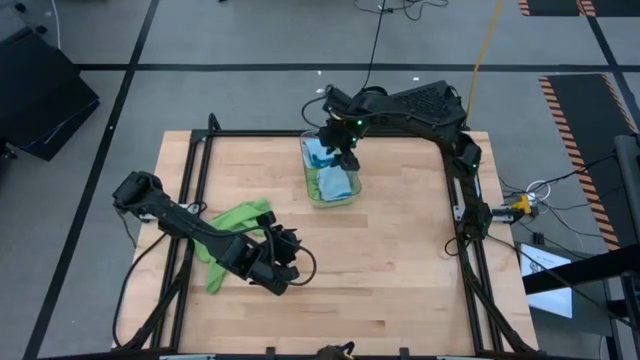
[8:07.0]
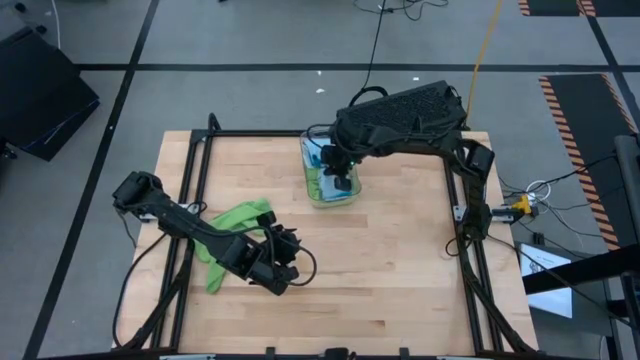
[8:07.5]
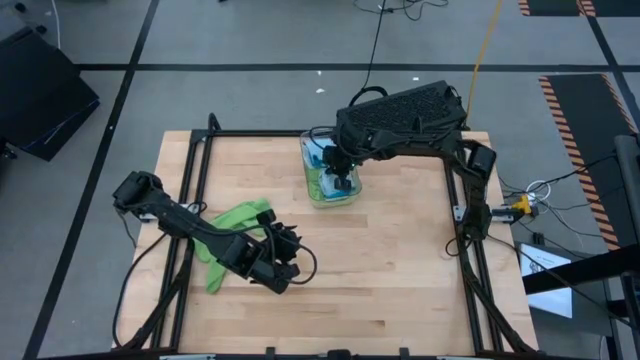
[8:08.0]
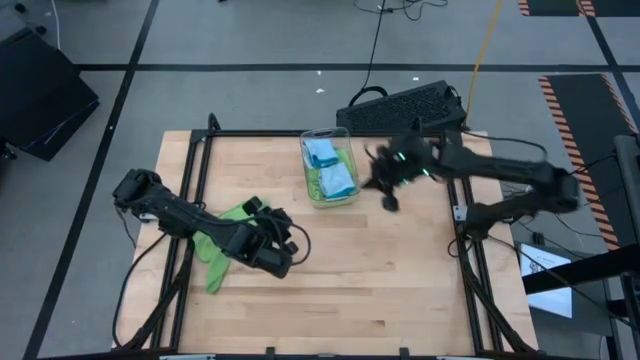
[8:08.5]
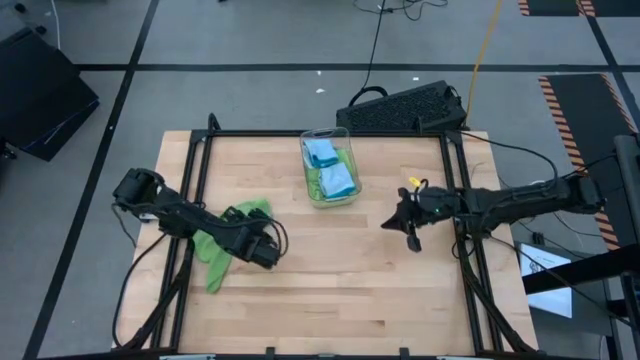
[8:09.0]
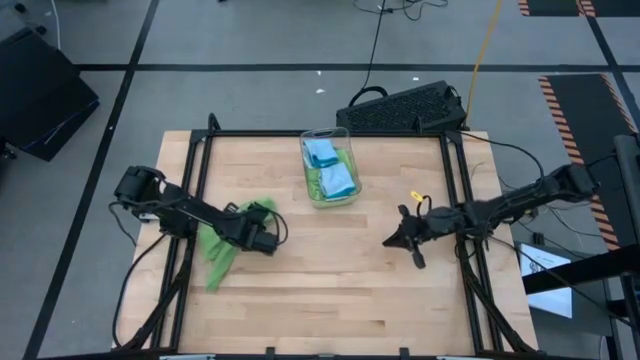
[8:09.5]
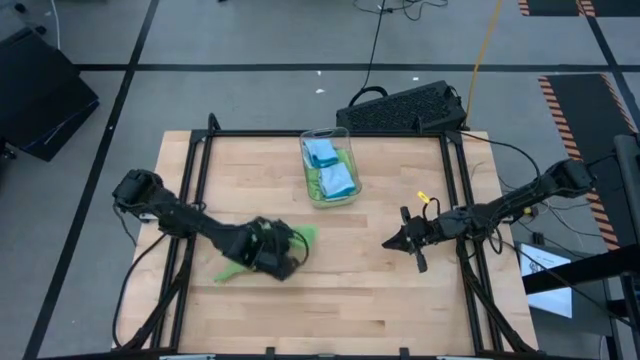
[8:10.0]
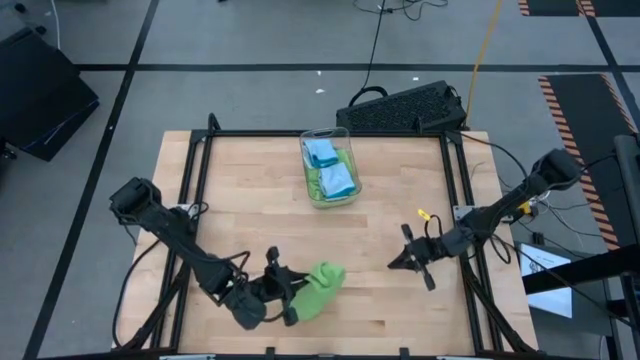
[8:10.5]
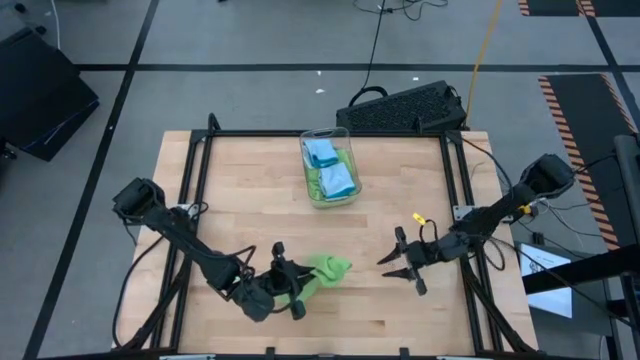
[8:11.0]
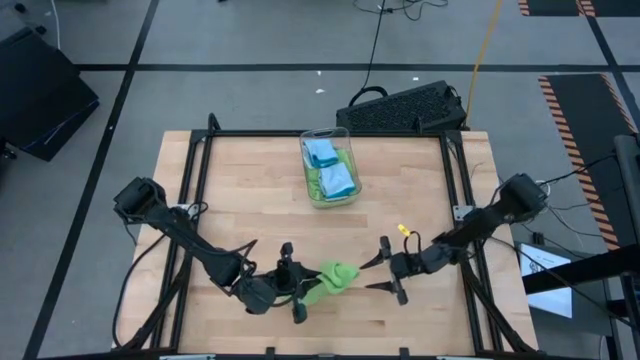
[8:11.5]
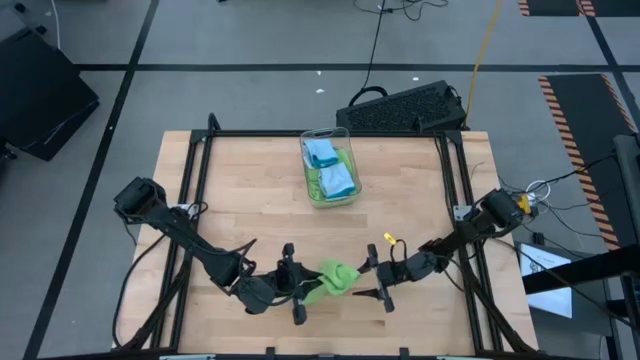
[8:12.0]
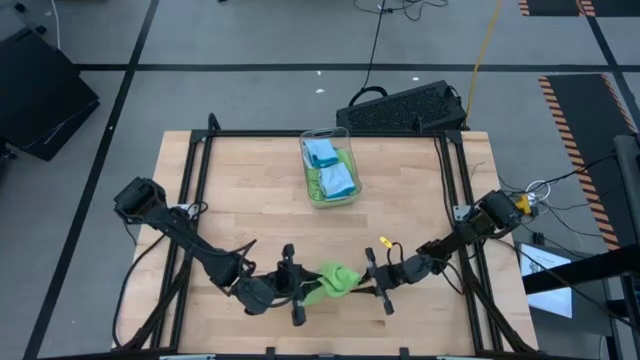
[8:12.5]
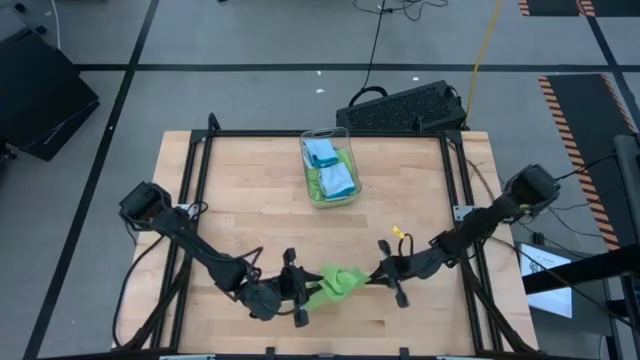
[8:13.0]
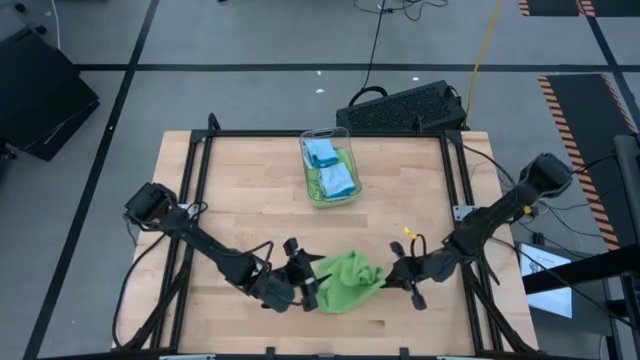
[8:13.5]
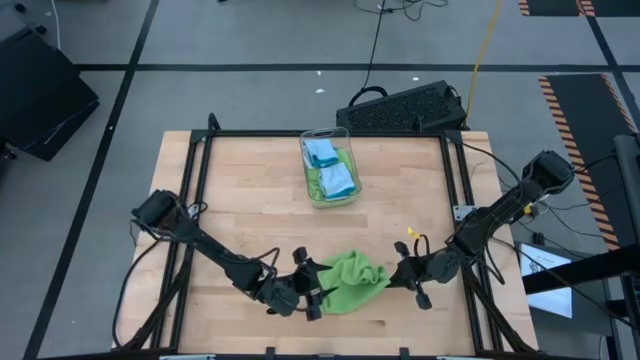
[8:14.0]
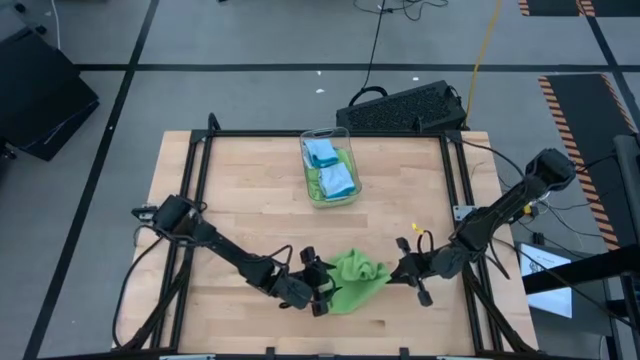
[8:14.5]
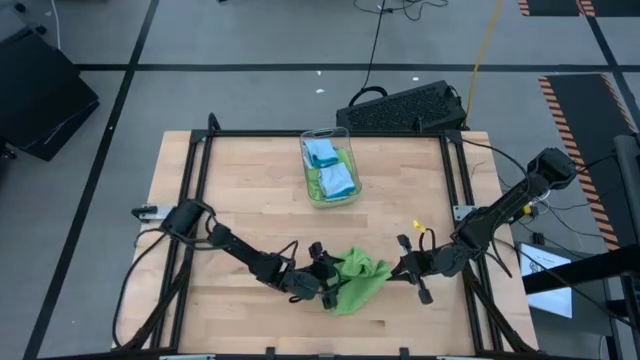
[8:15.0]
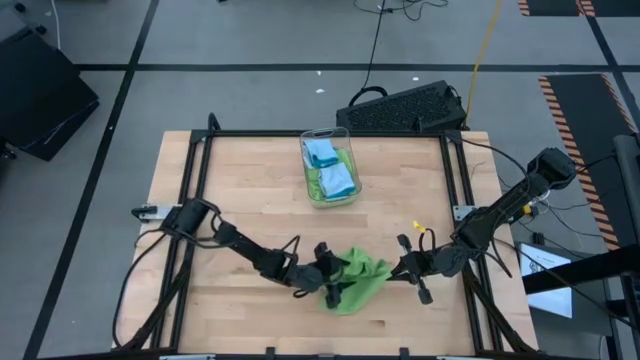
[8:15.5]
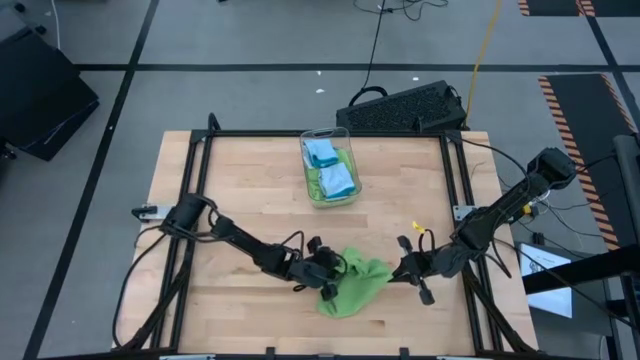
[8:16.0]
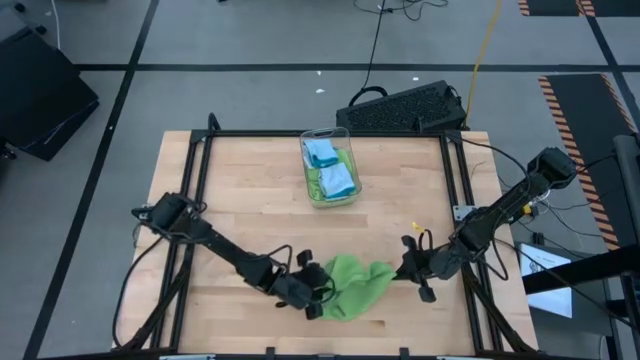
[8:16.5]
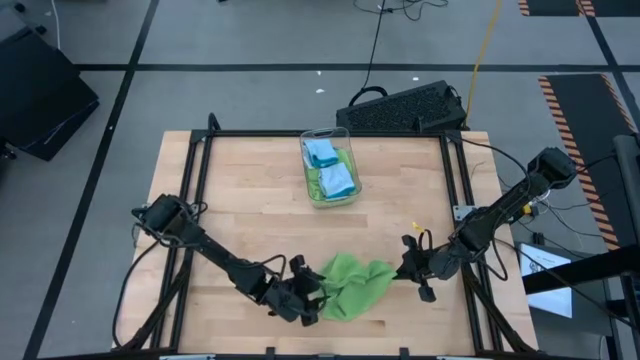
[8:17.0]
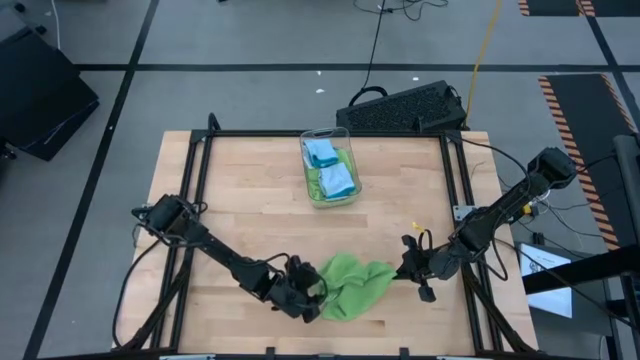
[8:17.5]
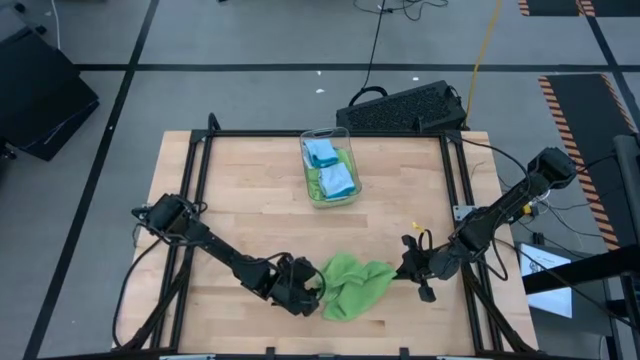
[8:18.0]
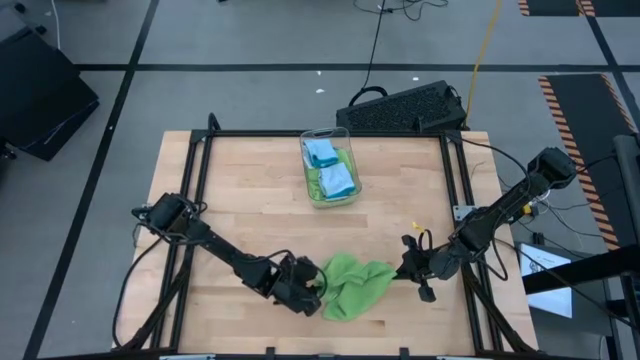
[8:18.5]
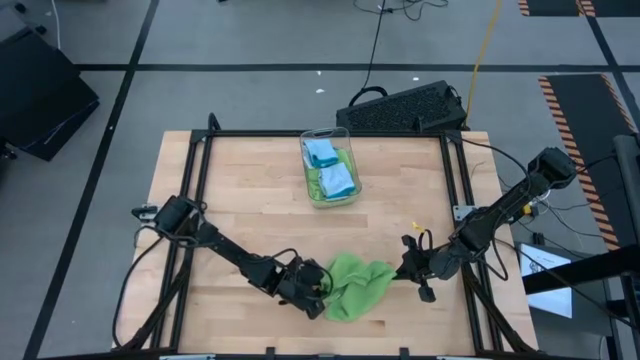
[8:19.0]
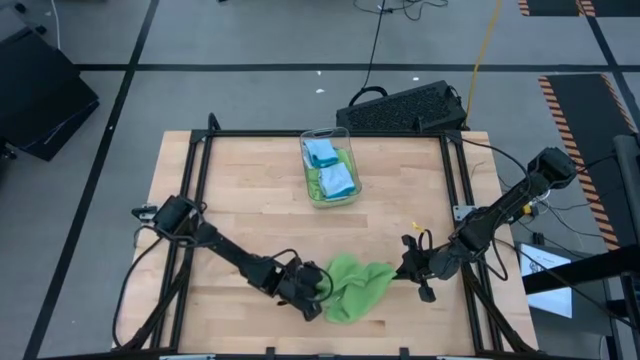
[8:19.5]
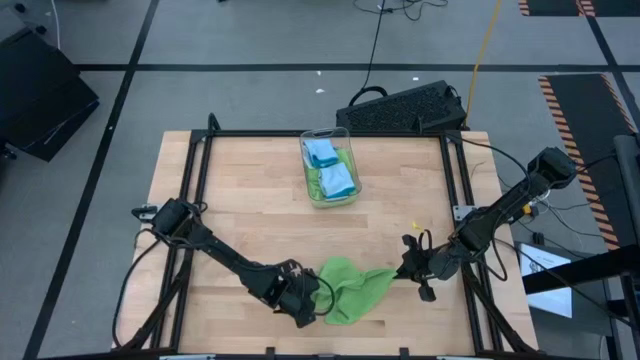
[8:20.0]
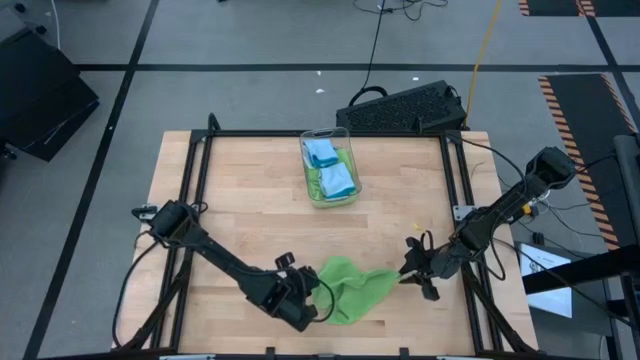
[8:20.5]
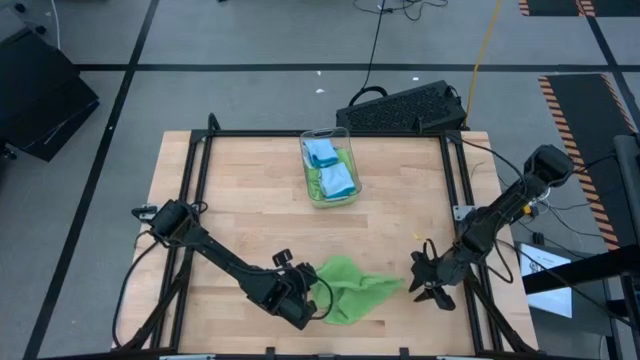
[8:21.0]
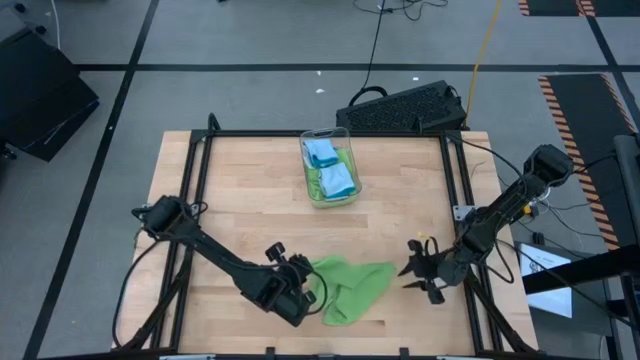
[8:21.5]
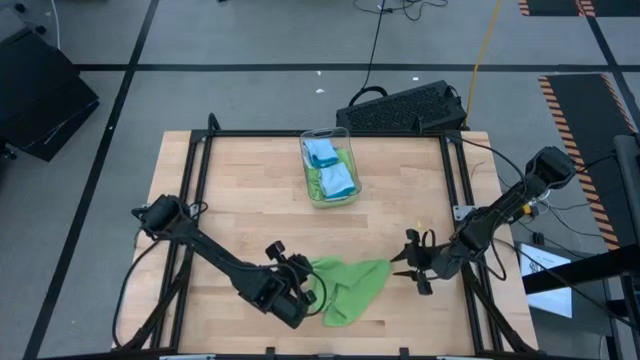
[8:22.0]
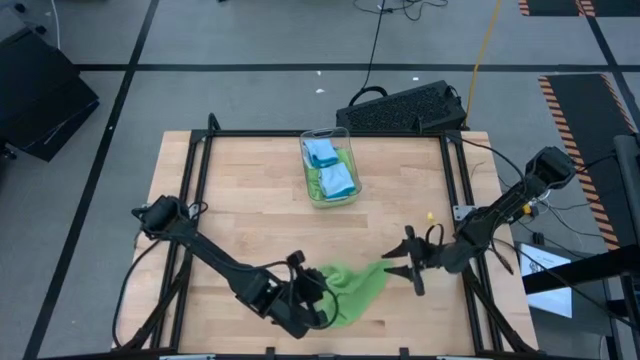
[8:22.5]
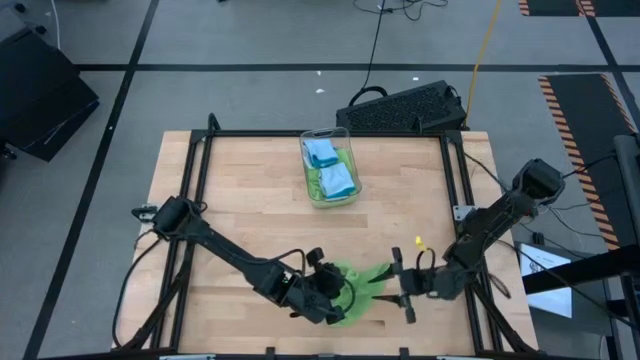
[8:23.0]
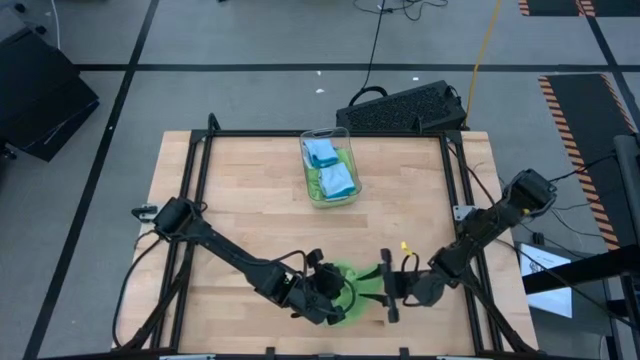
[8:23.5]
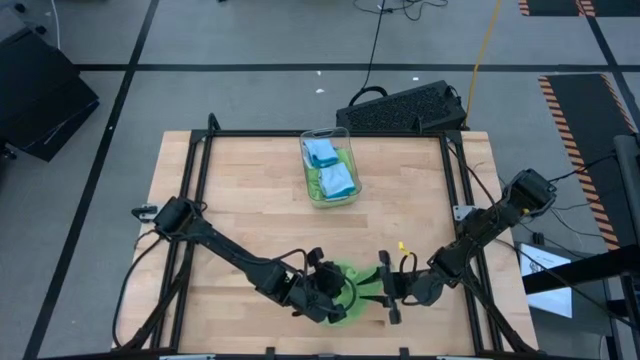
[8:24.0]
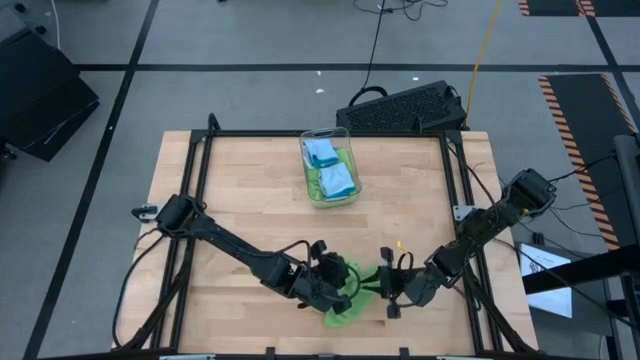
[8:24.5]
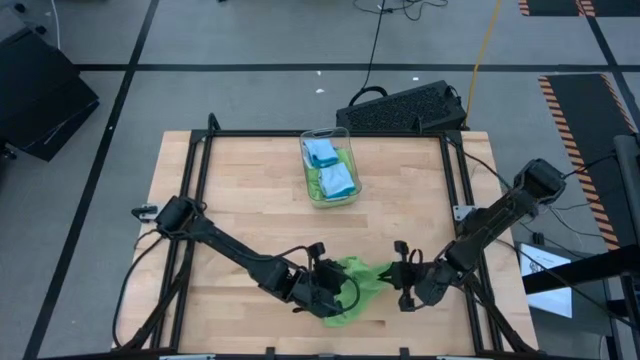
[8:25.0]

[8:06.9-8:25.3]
Task: Fold microfiber towels
Fold the green towel
